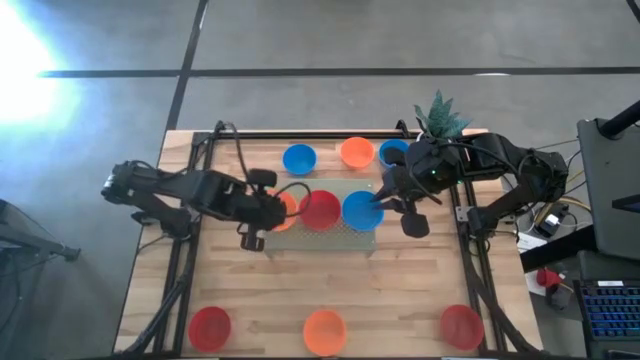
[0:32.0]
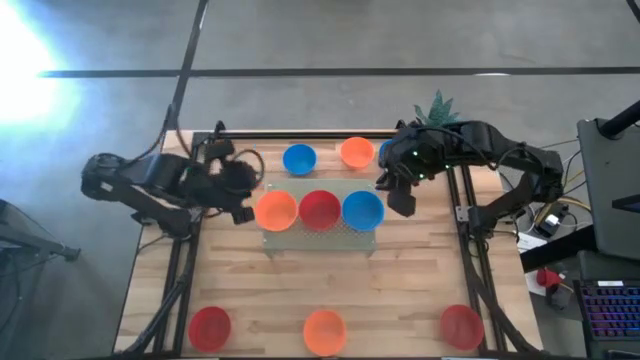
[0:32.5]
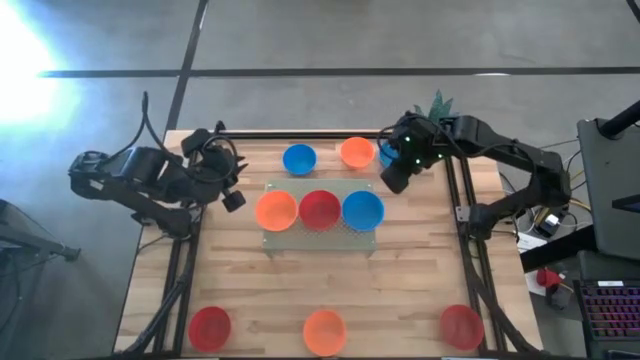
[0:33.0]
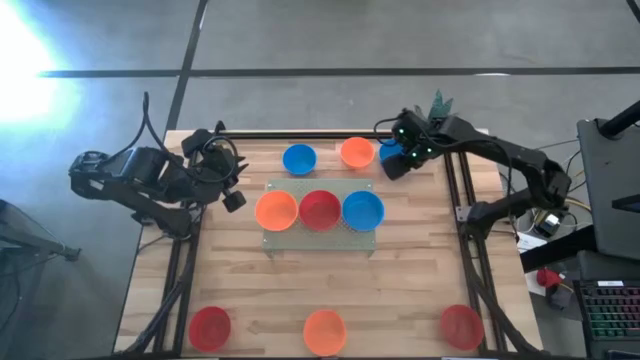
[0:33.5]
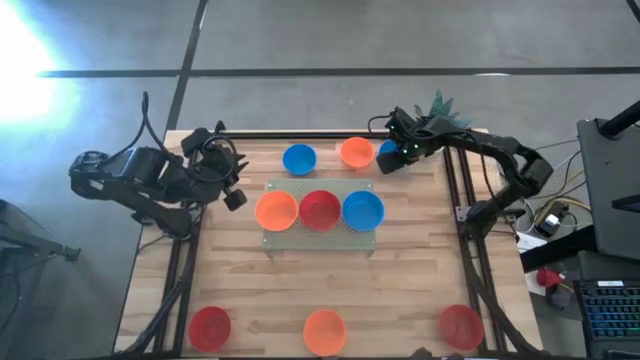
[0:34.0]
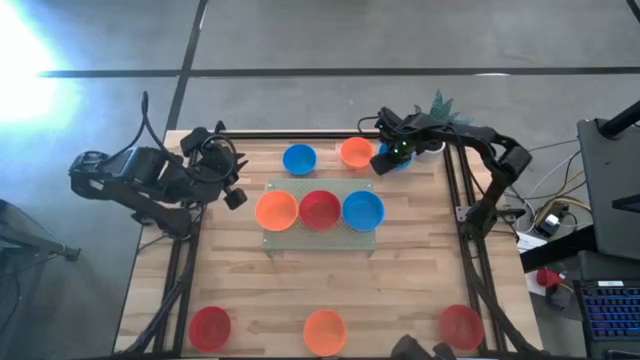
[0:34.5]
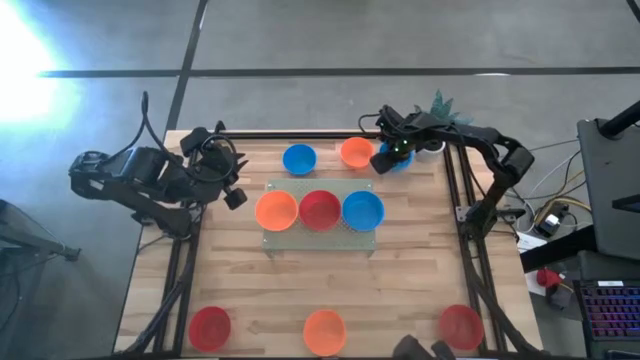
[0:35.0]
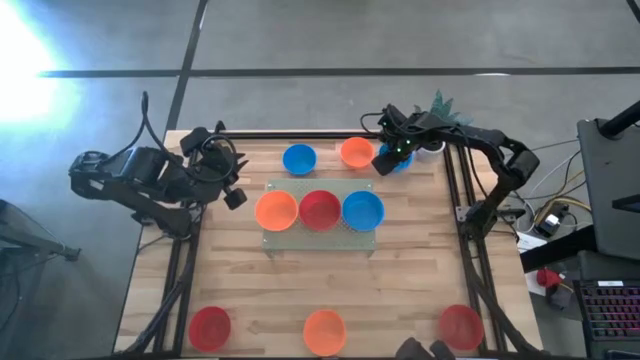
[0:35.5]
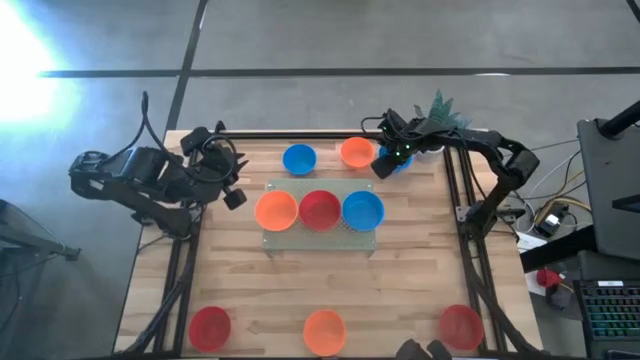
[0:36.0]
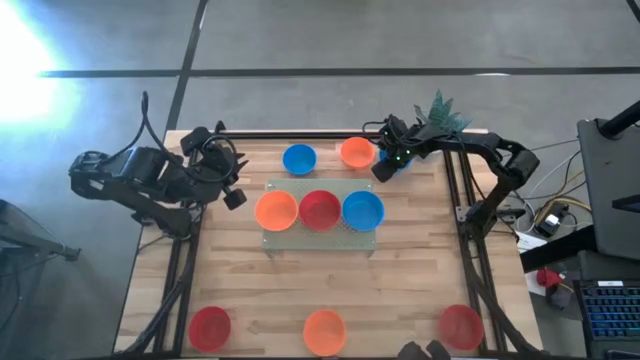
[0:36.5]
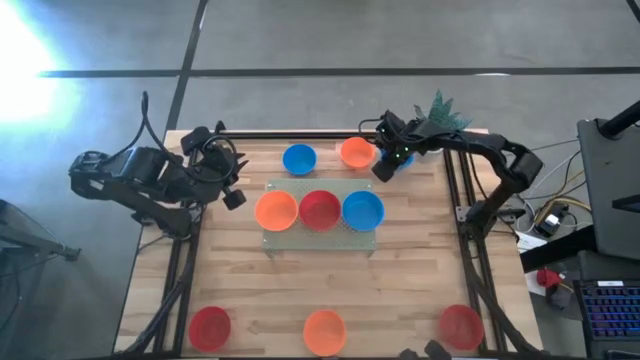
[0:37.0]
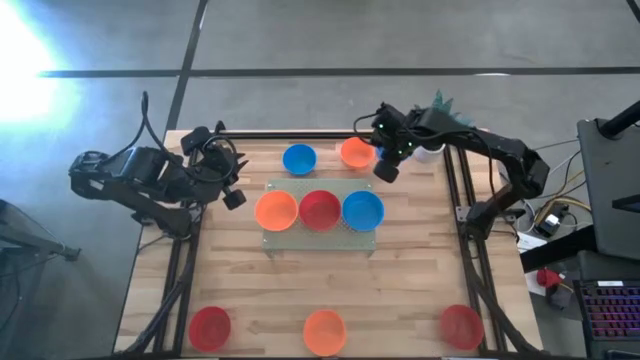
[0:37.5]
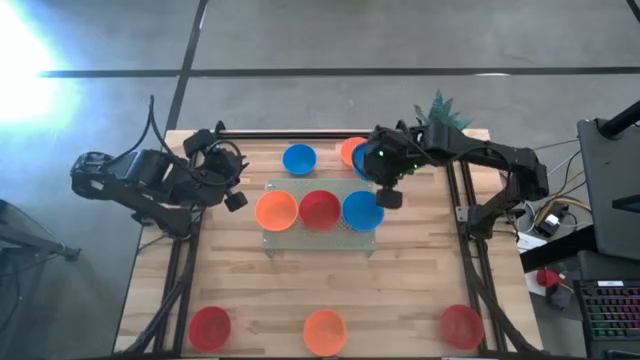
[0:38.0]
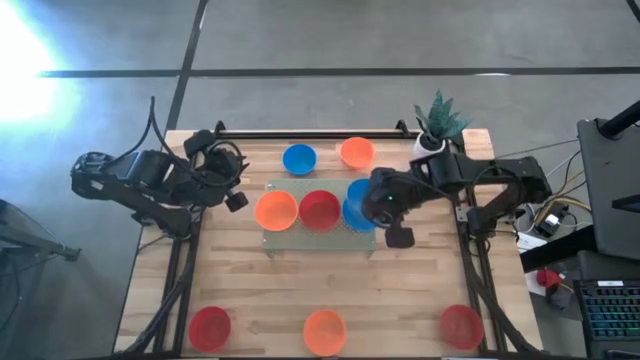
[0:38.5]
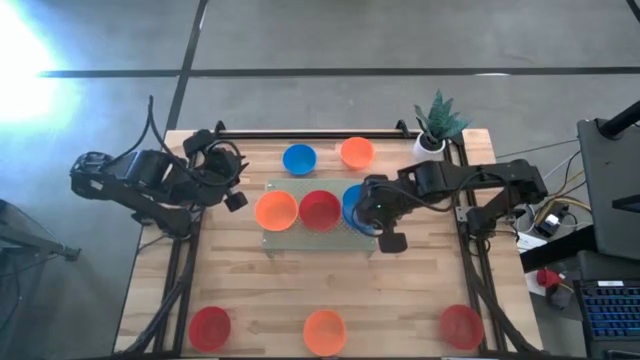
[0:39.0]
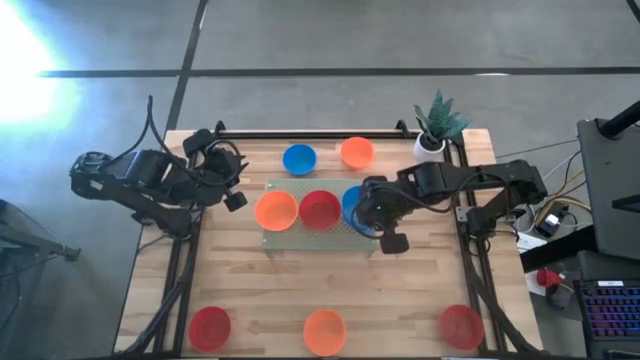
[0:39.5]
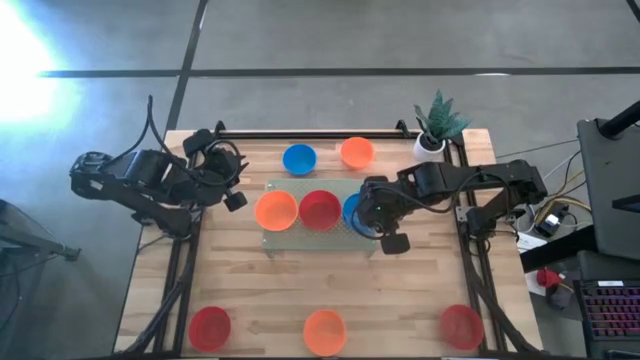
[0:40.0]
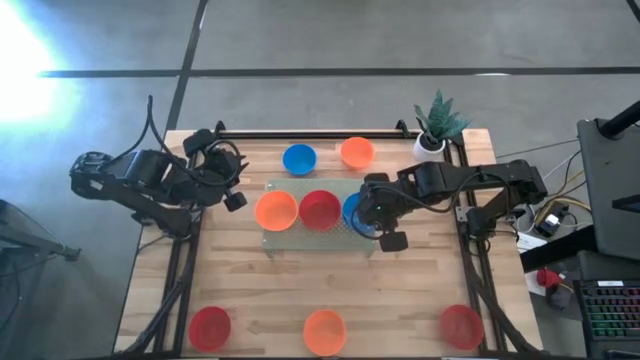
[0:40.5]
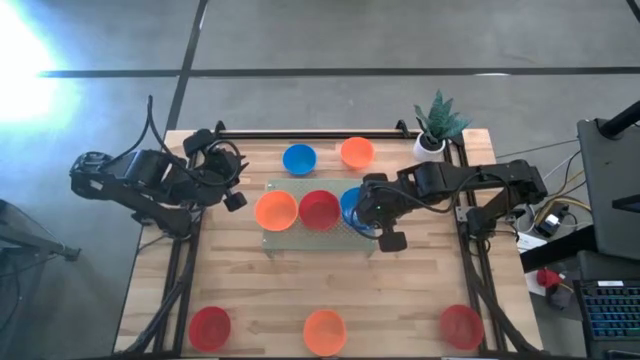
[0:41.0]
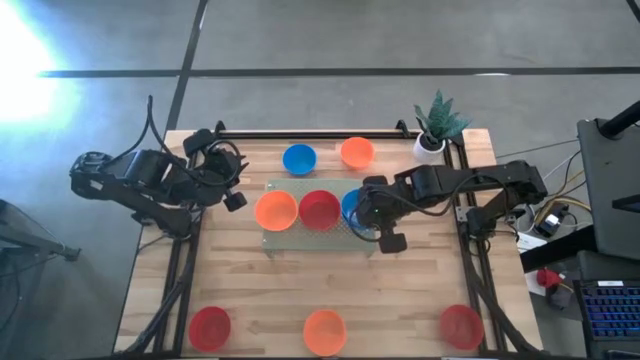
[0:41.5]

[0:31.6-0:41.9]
Task: Pick & Place Mini bowls
Stack the right blue bowl on top of the other blue bowl on the shelf

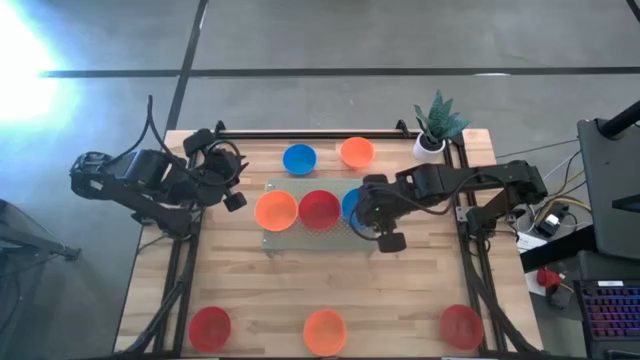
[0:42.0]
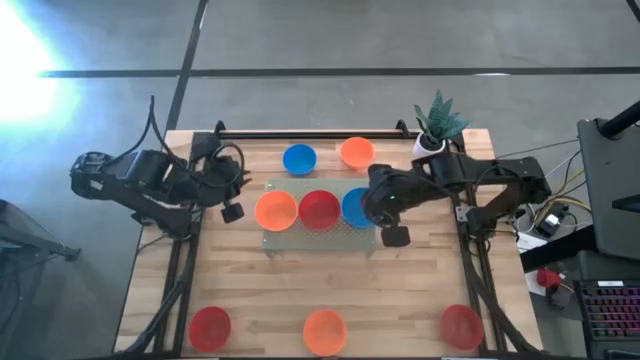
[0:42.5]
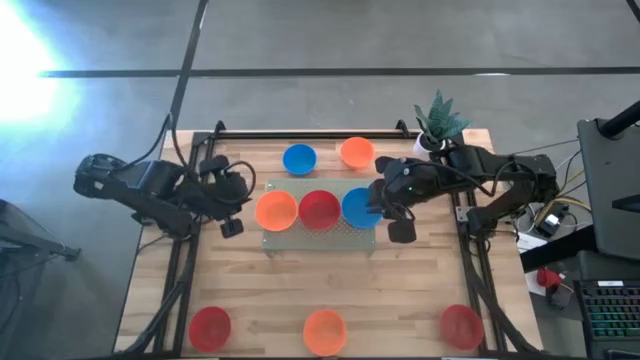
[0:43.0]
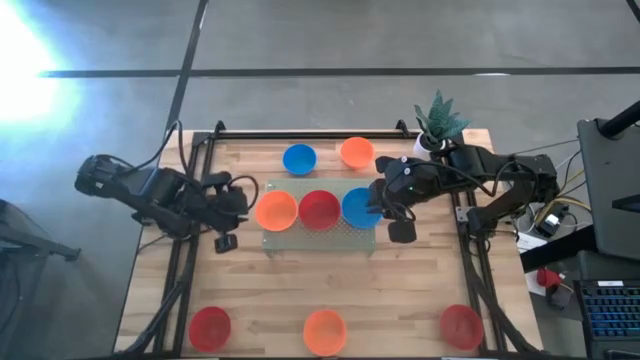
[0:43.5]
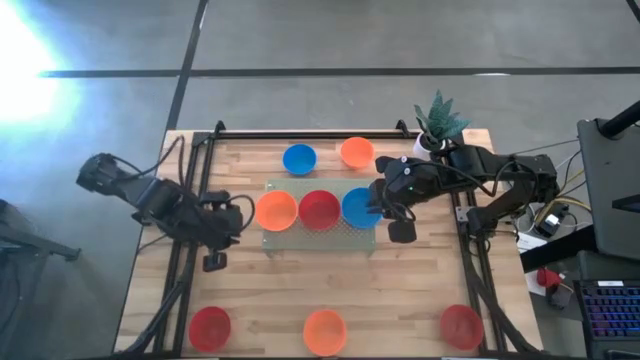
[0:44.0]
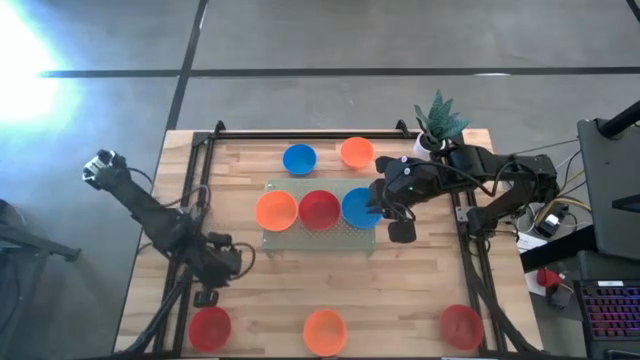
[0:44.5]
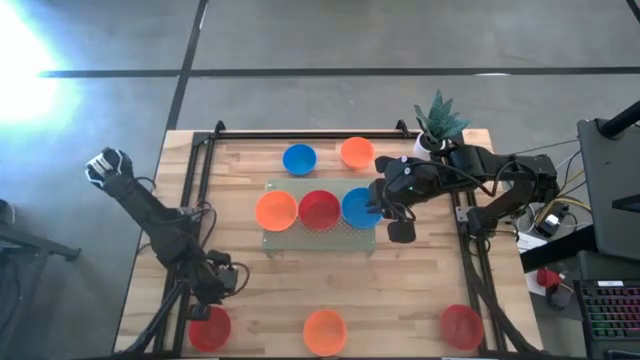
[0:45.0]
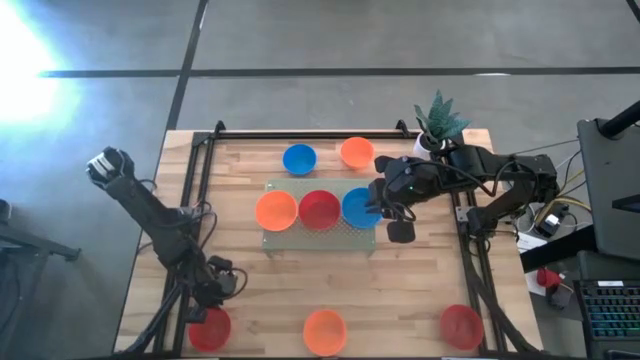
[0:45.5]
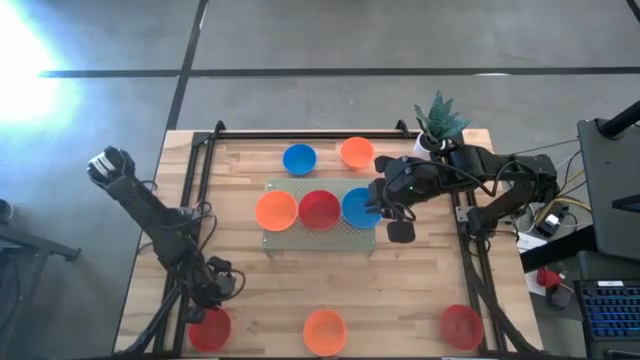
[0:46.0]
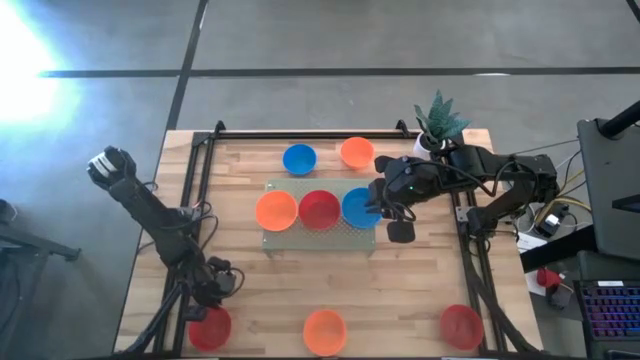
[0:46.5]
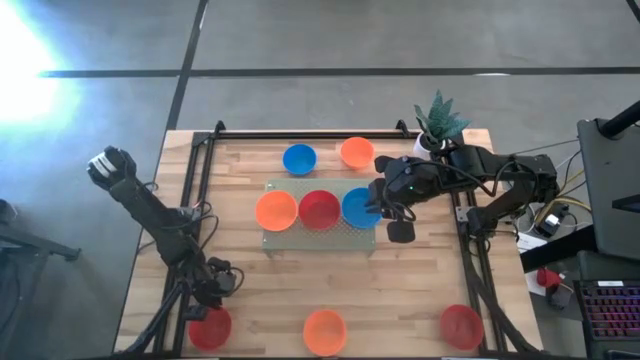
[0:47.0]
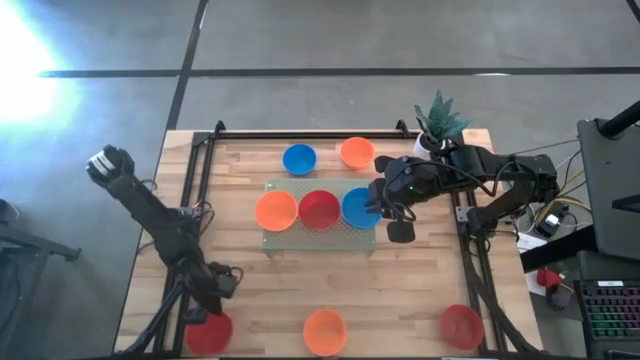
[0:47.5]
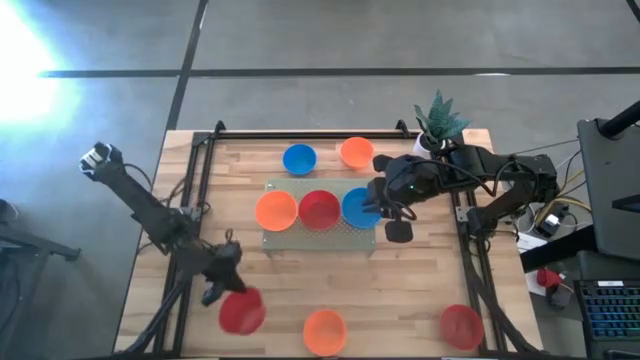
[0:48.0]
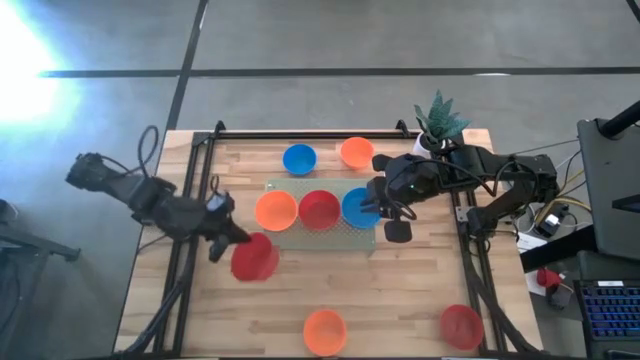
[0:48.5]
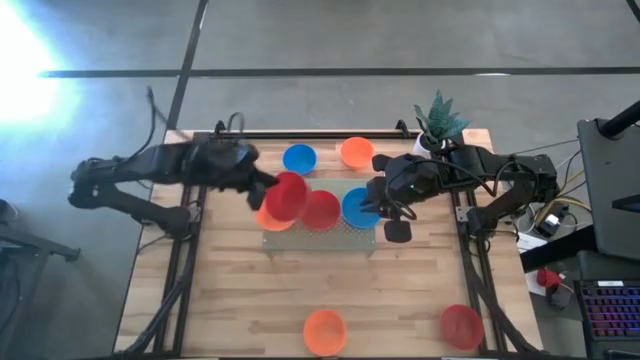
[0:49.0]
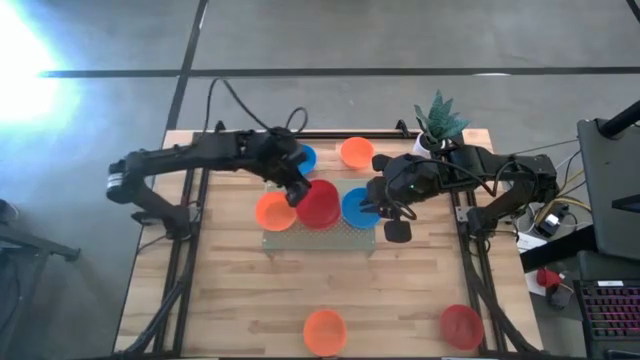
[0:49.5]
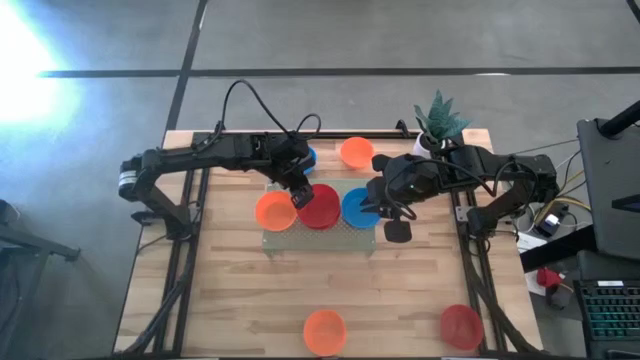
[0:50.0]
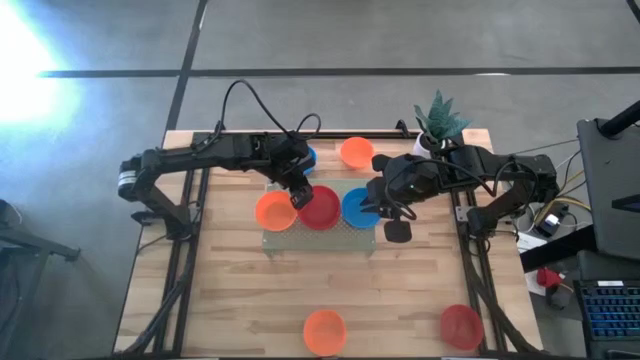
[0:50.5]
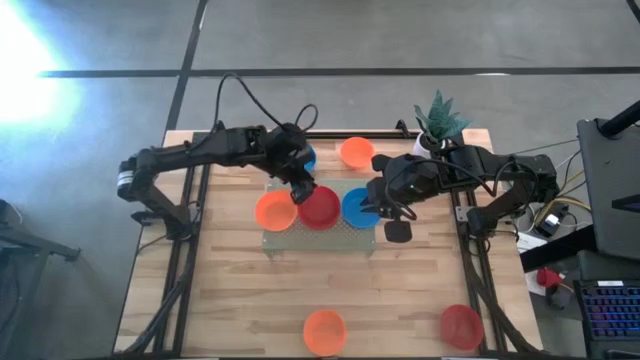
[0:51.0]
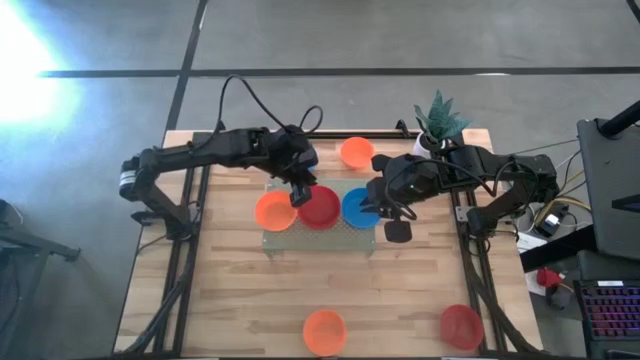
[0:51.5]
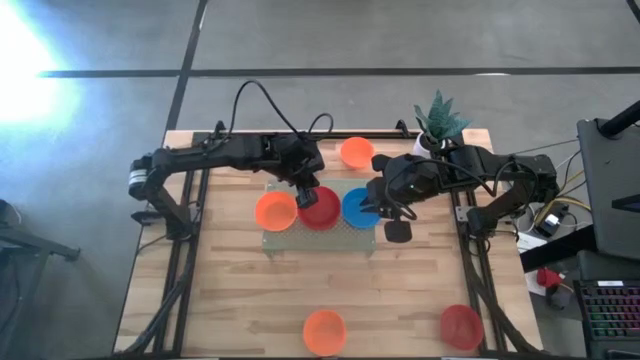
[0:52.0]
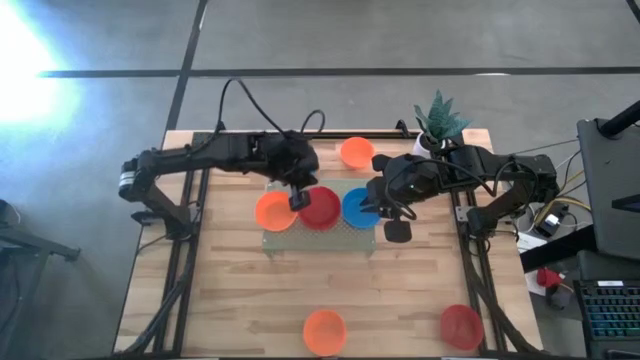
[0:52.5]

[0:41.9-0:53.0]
Stack the left red bowl on top of the other red bowl on the shelf

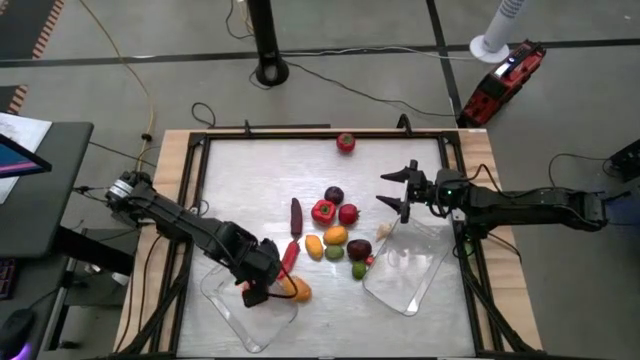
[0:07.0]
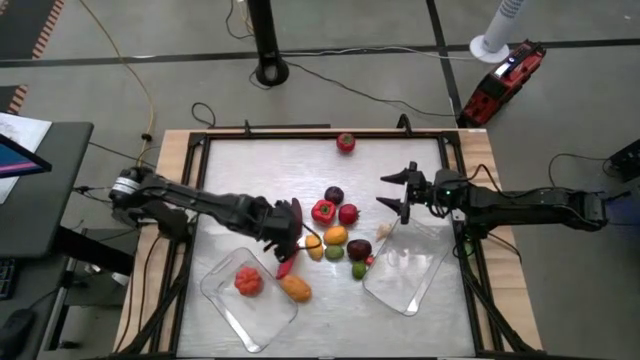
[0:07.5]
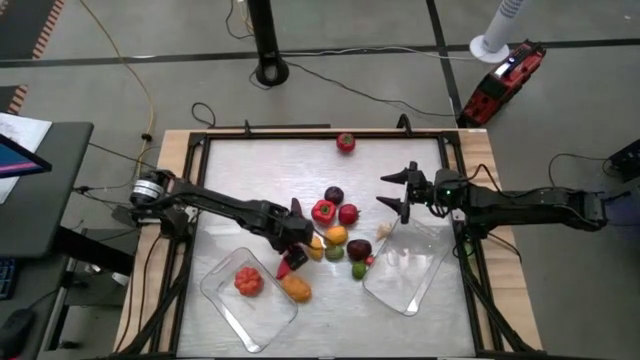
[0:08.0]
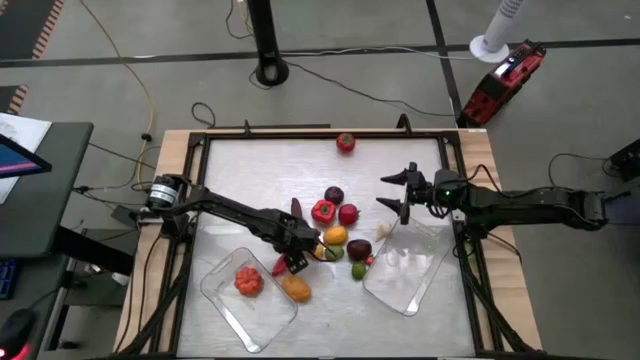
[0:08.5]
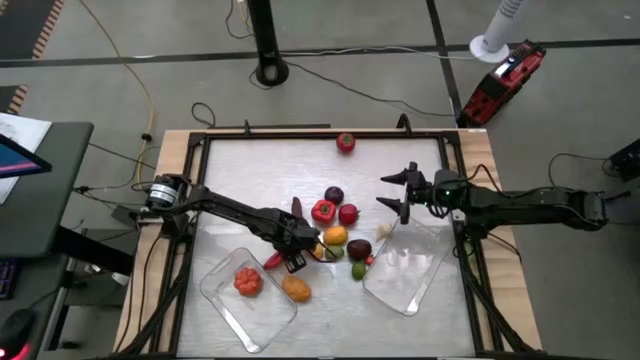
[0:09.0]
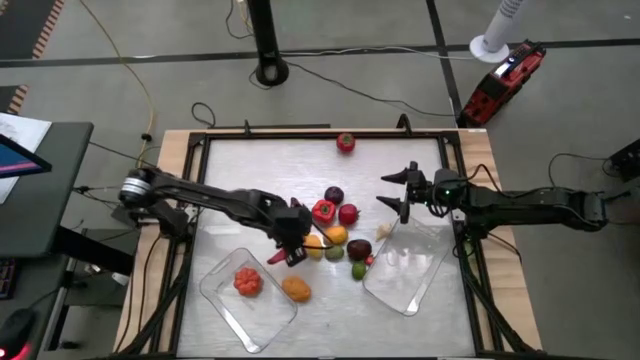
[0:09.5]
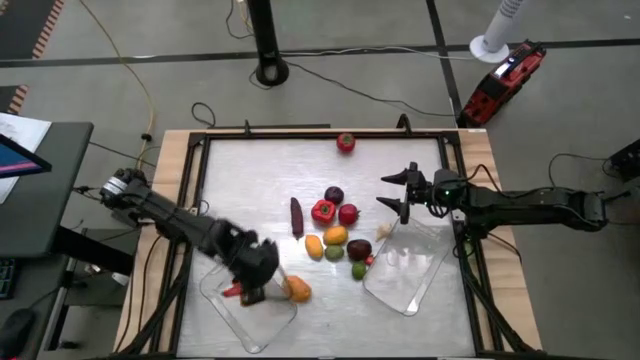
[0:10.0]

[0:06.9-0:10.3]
Task: Sort produce into baskets
Put the red chilli pepper into the left transparent bin
